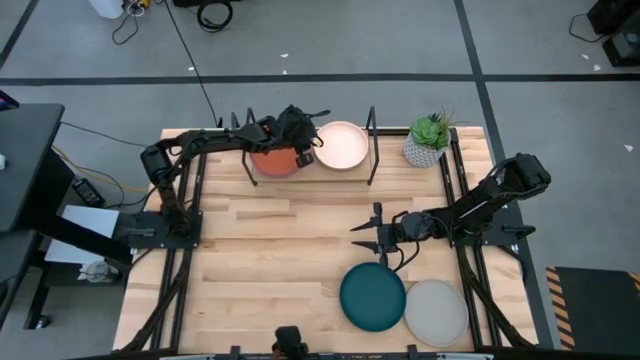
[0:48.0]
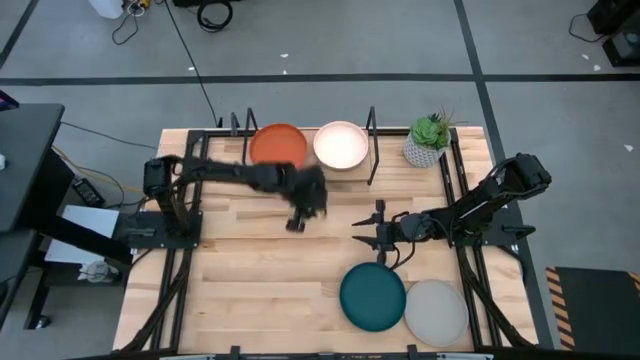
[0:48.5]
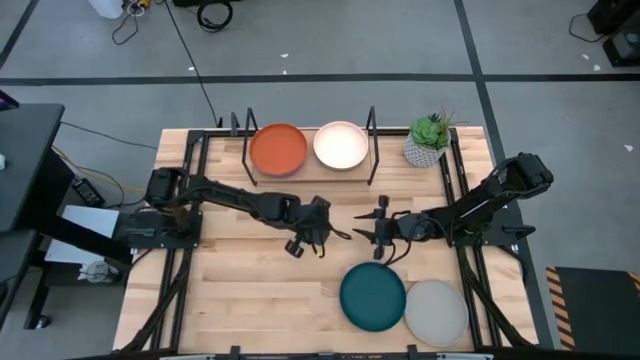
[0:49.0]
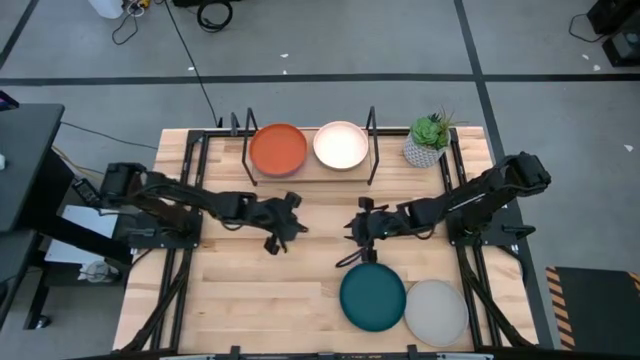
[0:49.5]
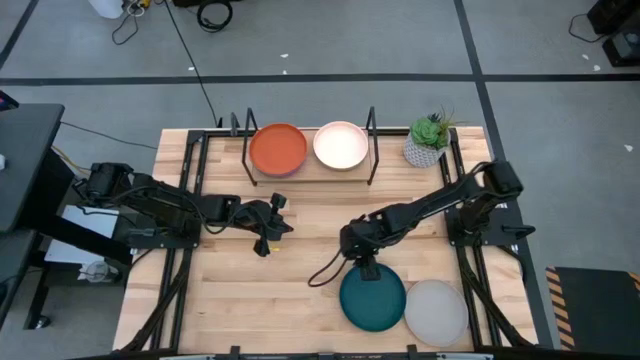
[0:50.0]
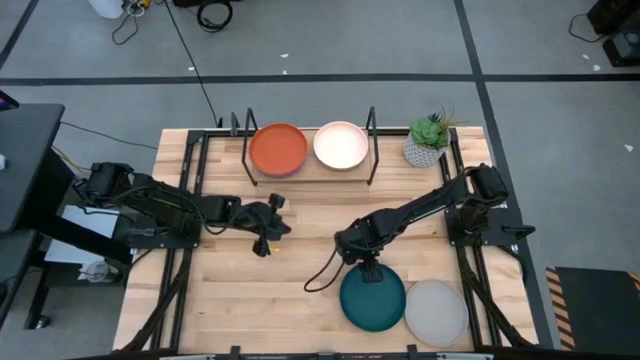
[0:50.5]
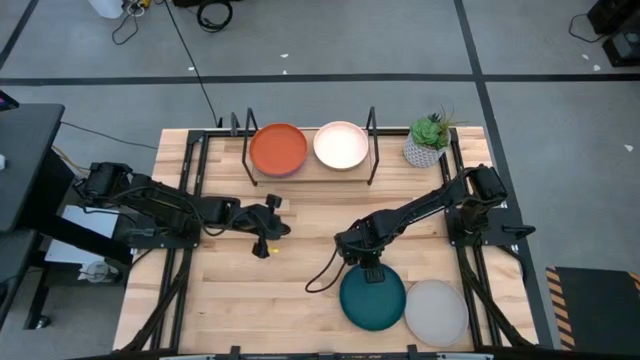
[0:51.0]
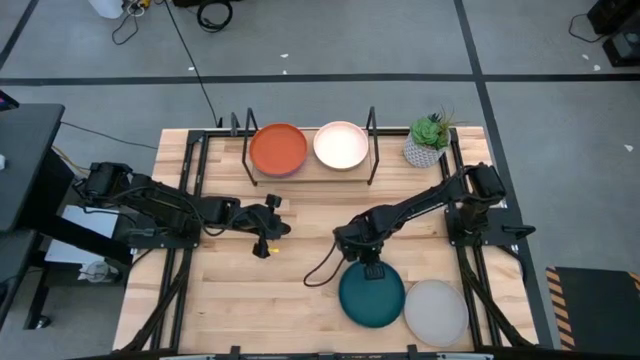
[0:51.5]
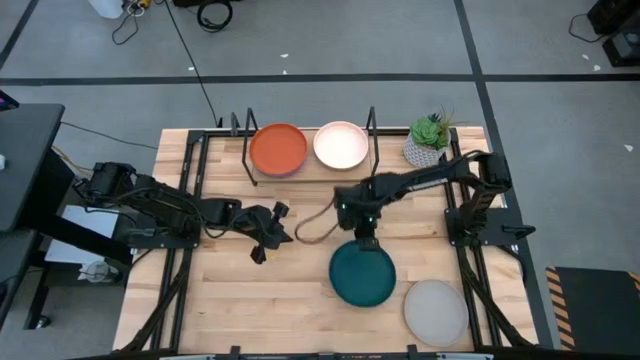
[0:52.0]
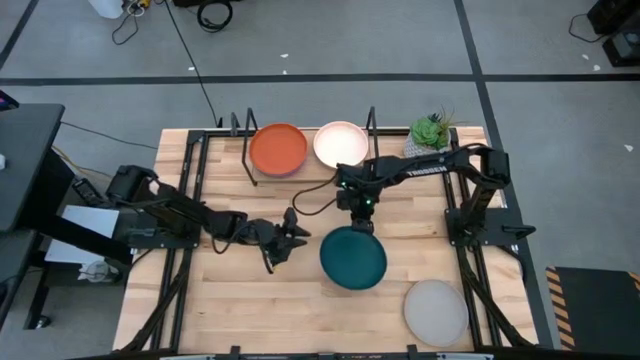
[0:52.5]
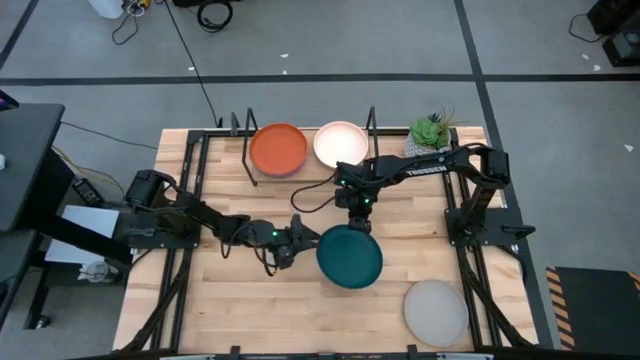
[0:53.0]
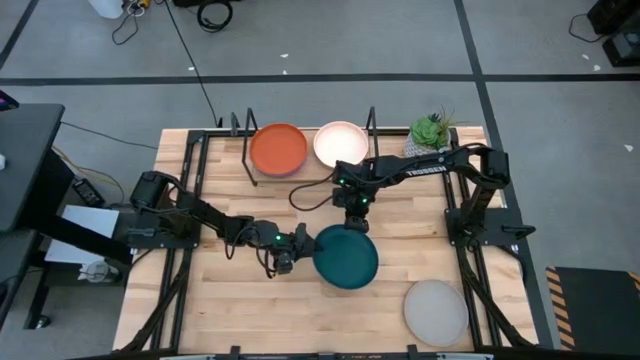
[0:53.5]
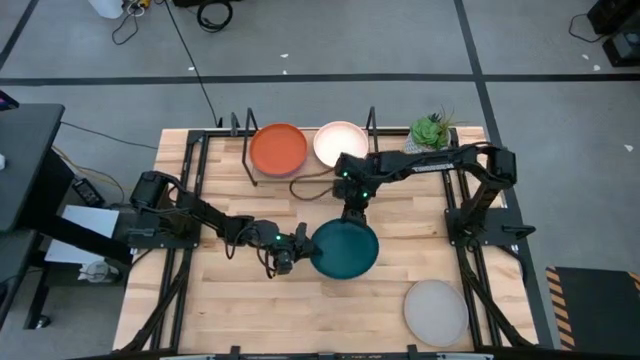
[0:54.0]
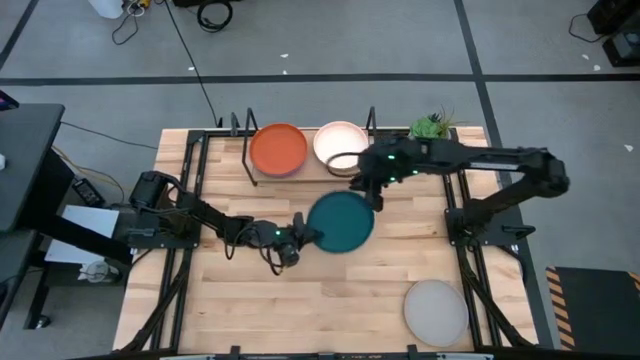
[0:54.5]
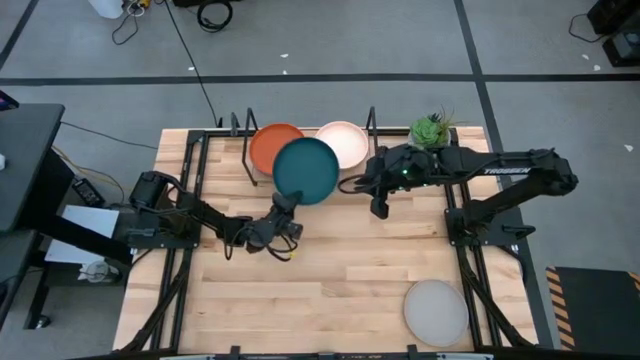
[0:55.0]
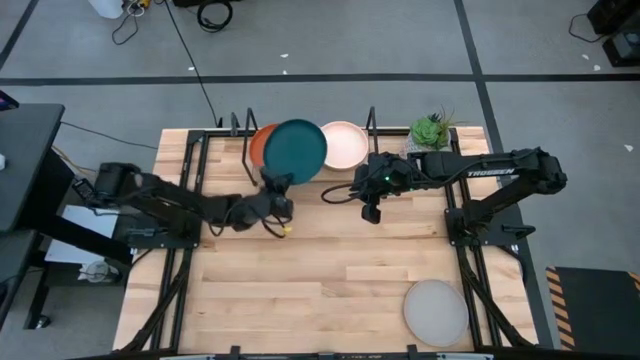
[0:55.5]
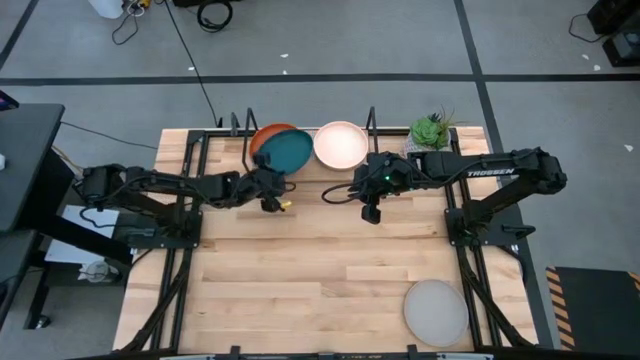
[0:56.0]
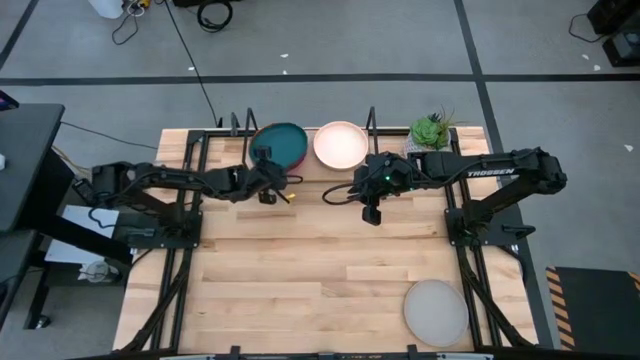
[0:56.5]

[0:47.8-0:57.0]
Task: Place and stack plates onto a shelf
Stack the dark blue plate on the top of orange plate on the shelf

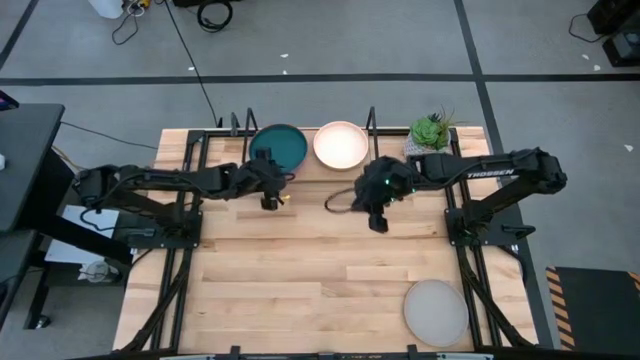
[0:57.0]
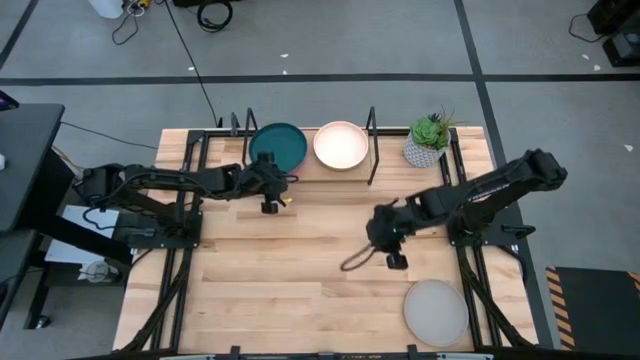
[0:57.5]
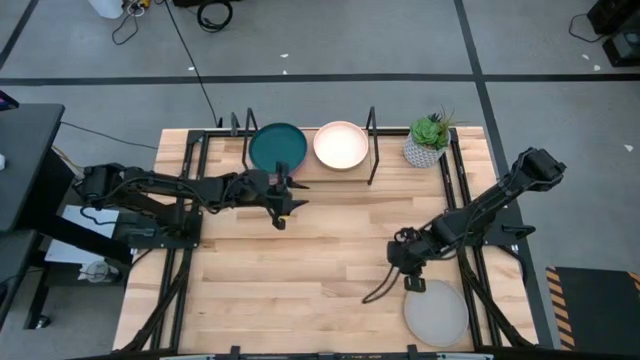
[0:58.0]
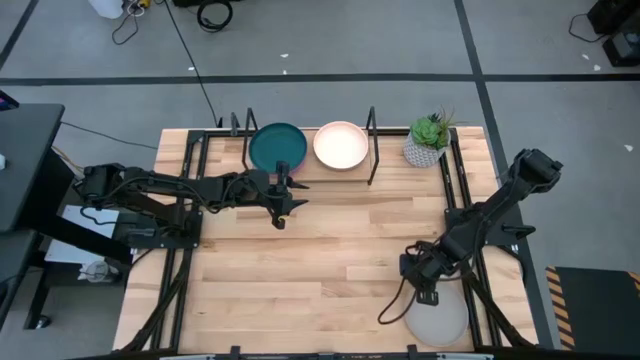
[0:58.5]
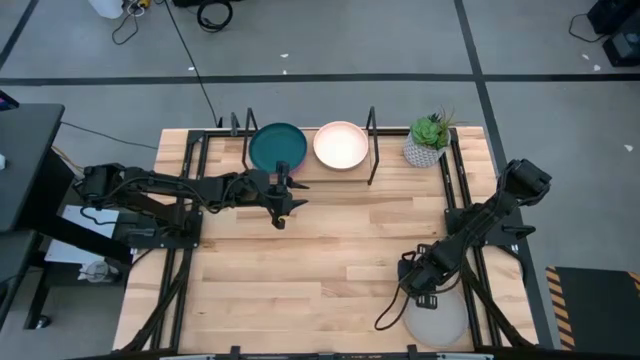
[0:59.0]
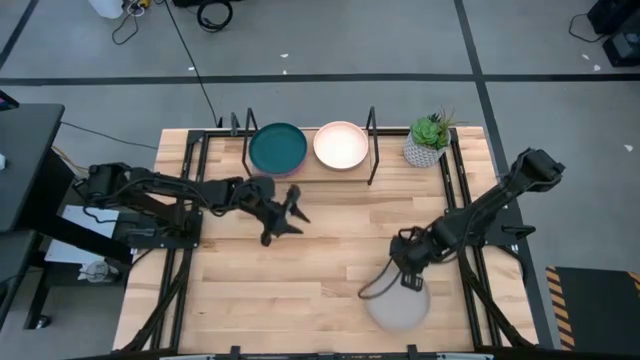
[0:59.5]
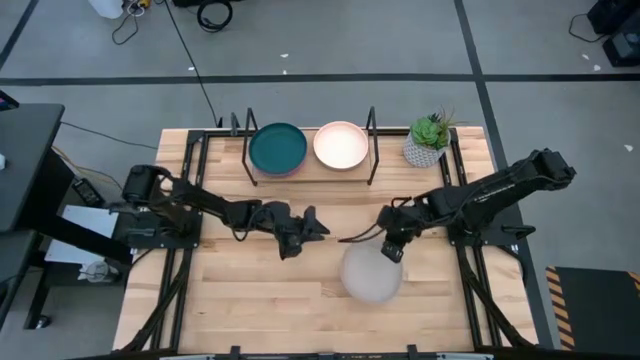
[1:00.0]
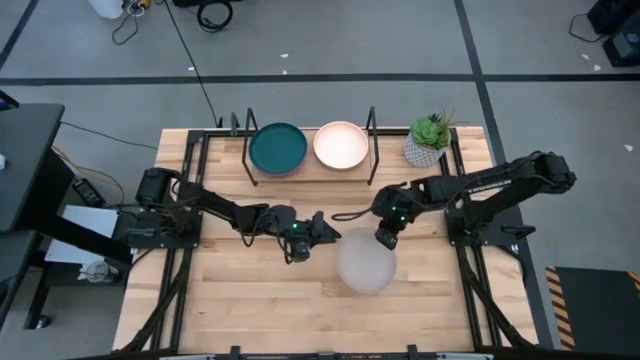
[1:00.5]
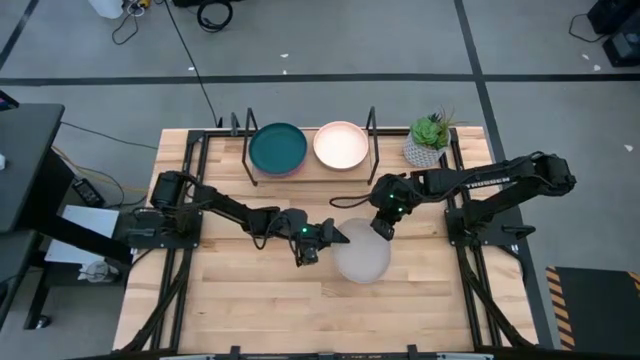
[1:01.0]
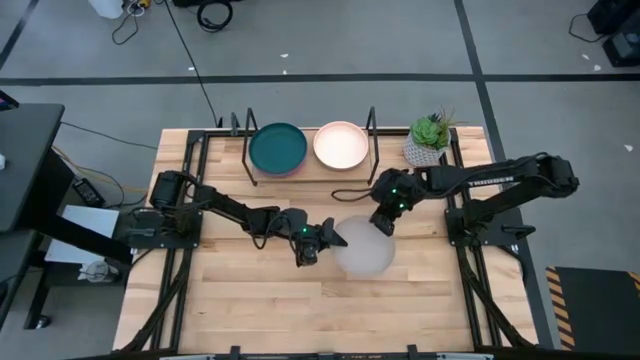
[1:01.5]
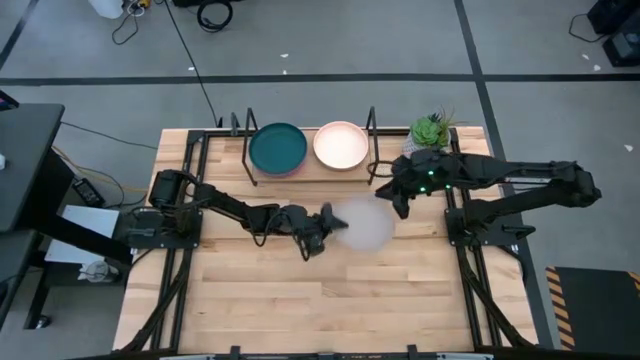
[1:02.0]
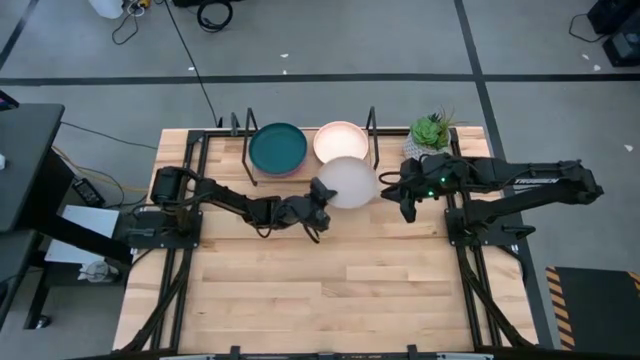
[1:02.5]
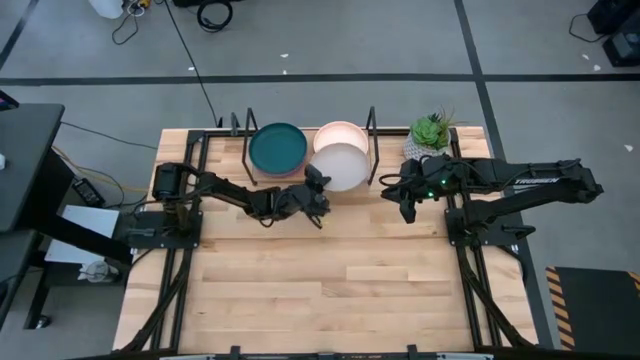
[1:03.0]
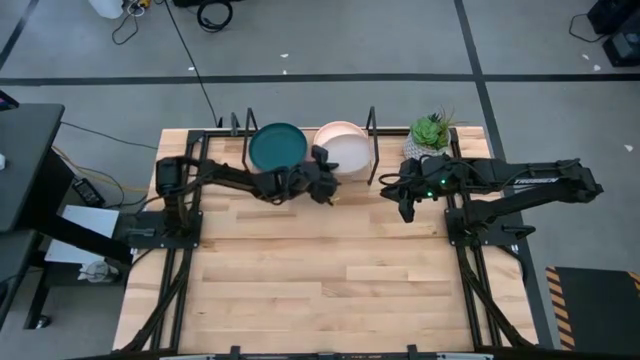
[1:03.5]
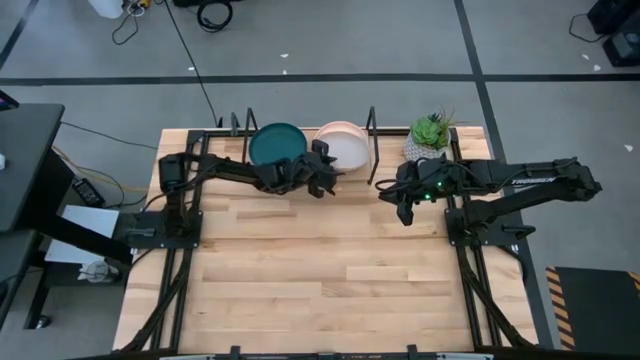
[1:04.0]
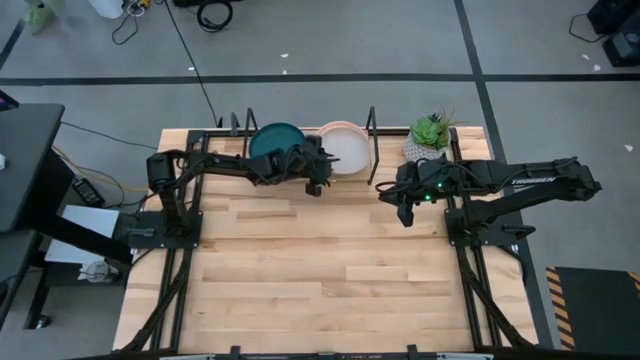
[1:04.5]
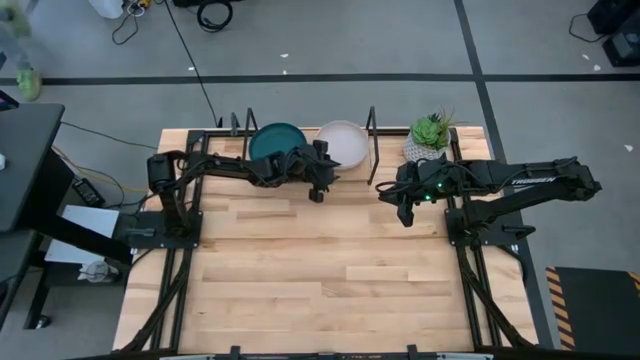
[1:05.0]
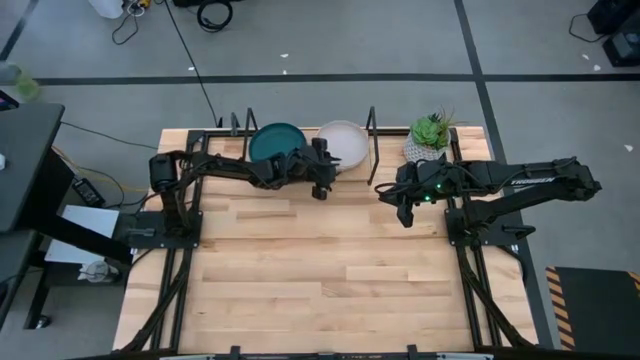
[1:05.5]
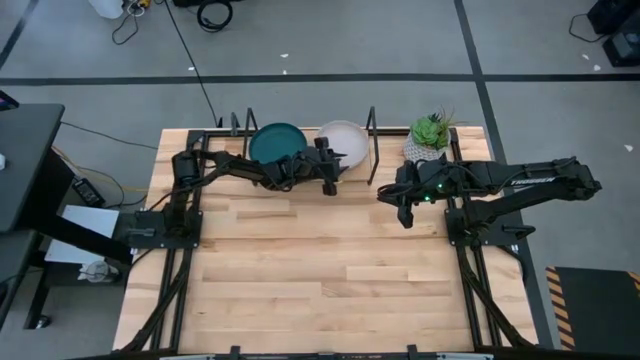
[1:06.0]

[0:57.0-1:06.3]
Stack the gray plate on the top of white plate on the shelf

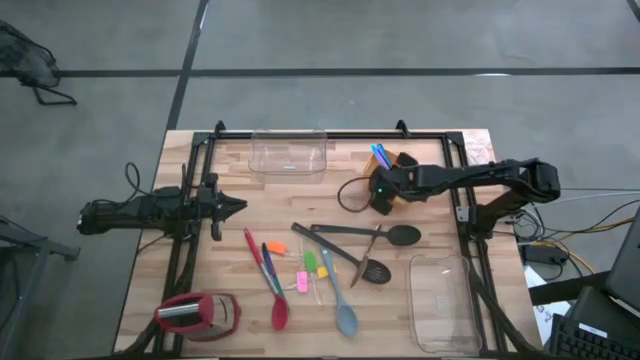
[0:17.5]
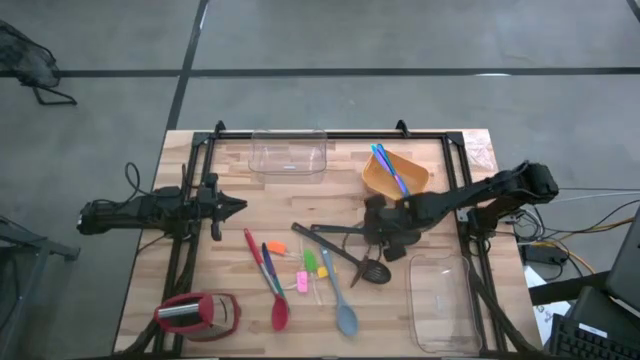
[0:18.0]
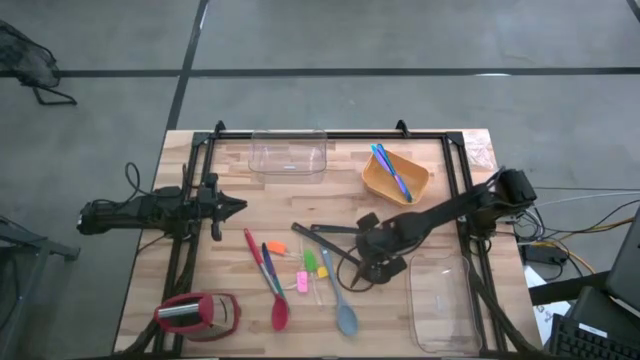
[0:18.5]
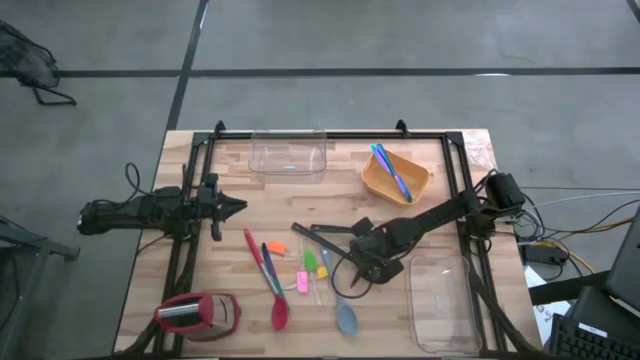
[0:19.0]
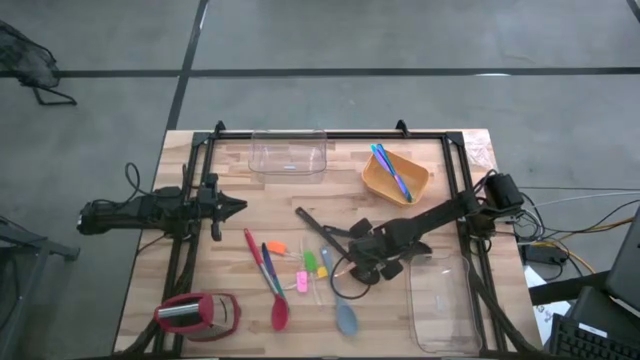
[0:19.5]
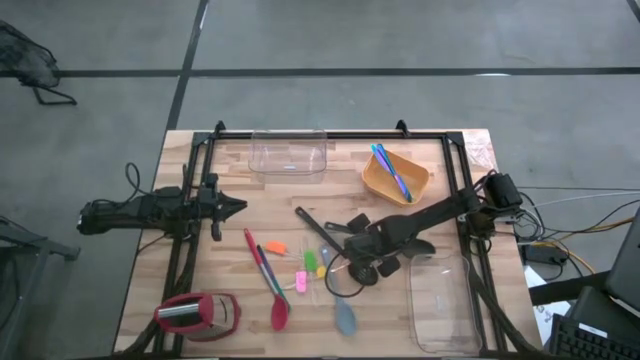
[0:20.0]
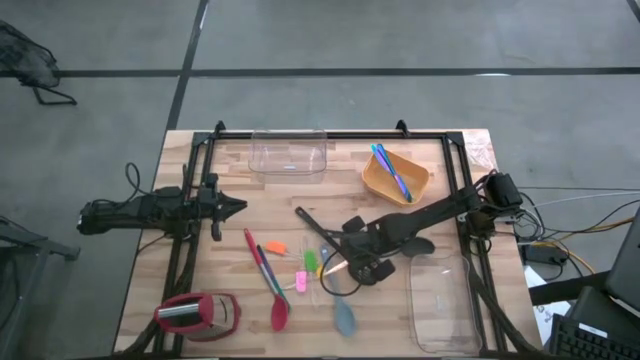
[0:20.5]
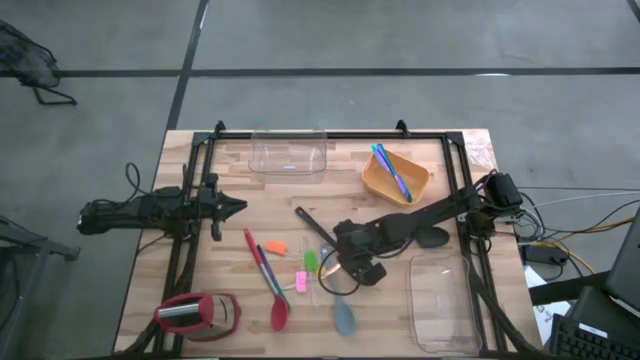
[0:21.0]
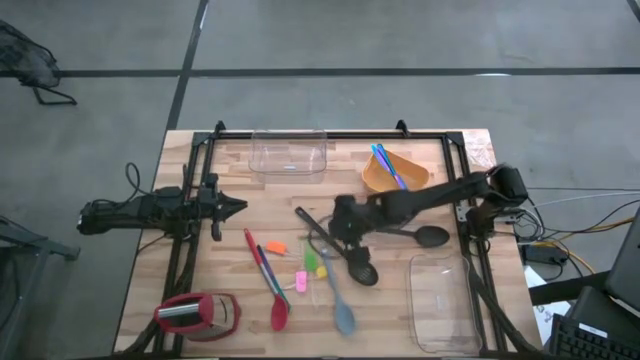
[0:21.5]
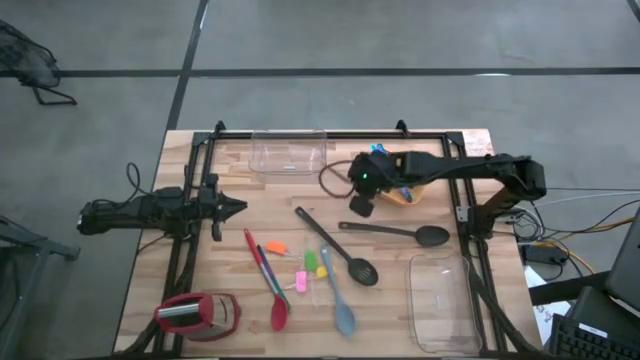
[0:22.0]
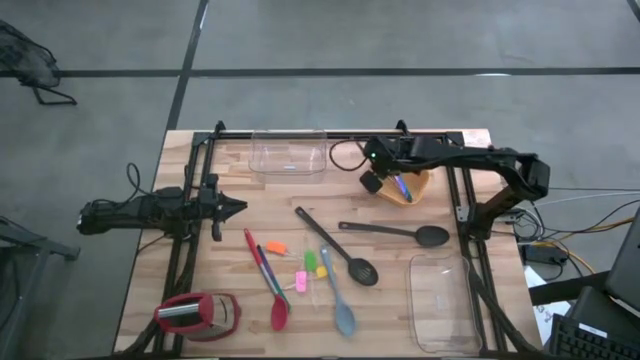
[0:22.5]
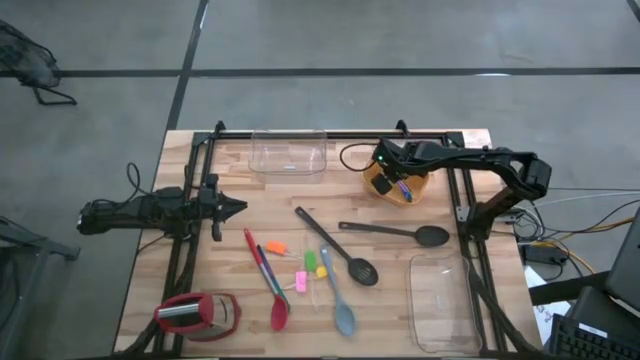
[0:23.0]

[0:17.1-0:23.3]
Task: Pick & Place Kitchen Items
Put the gold kitchen knife into the yellow bin
